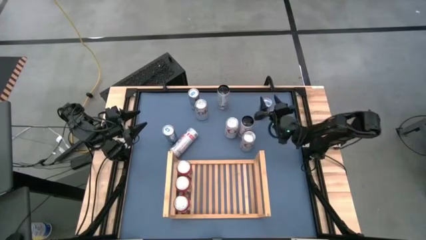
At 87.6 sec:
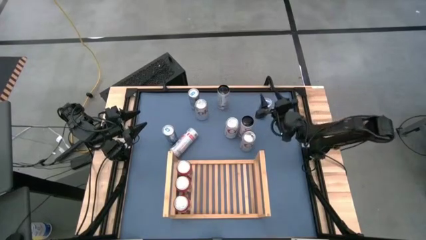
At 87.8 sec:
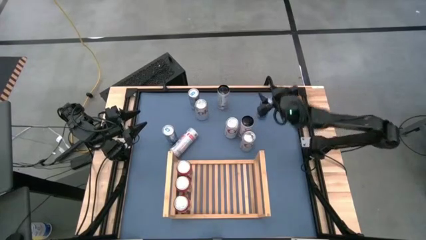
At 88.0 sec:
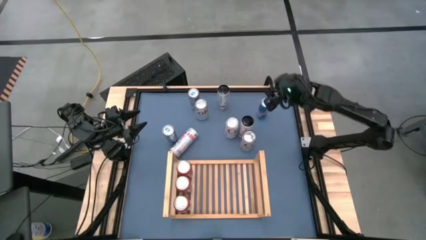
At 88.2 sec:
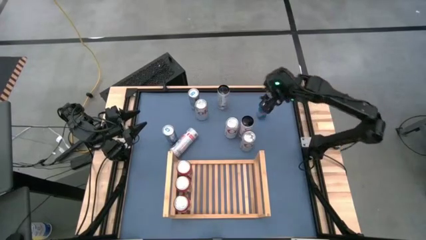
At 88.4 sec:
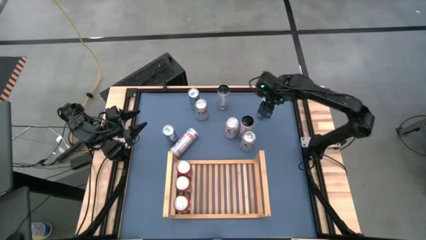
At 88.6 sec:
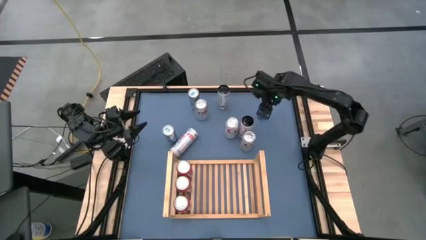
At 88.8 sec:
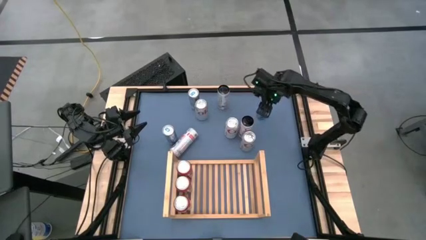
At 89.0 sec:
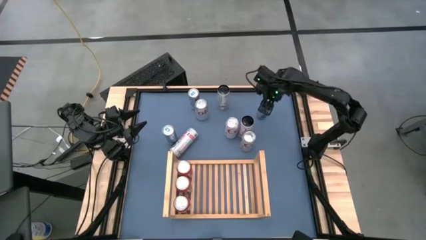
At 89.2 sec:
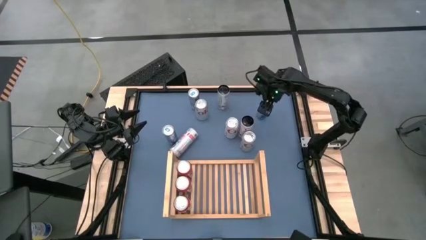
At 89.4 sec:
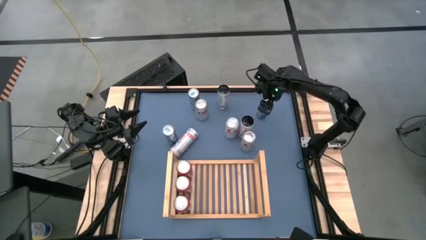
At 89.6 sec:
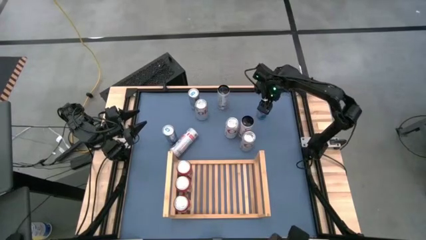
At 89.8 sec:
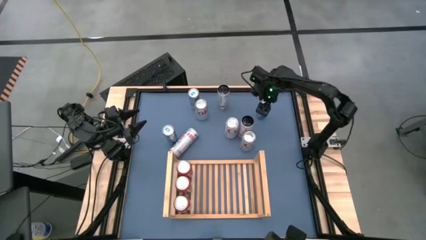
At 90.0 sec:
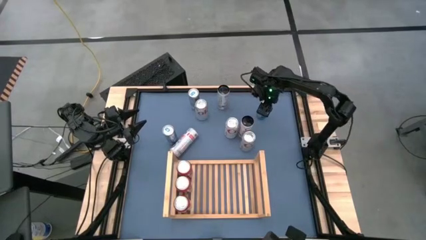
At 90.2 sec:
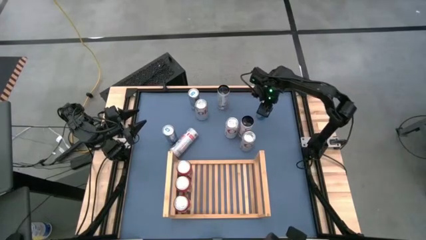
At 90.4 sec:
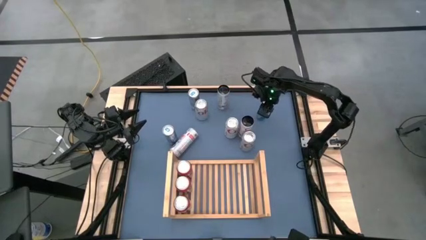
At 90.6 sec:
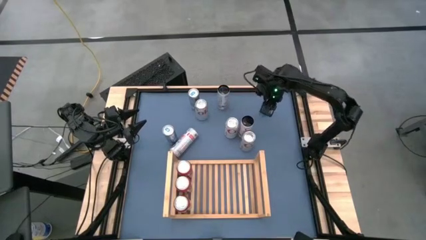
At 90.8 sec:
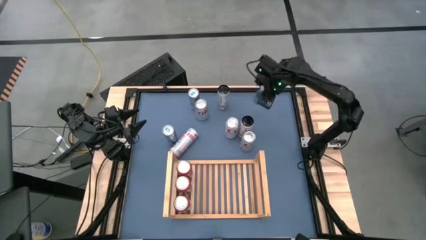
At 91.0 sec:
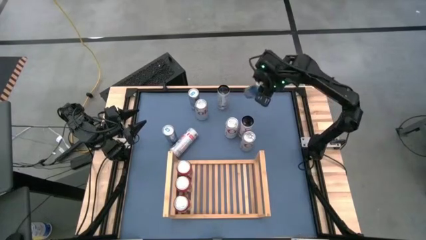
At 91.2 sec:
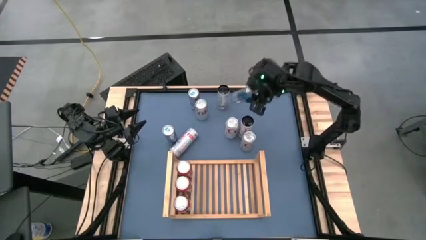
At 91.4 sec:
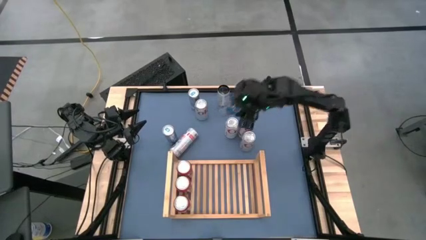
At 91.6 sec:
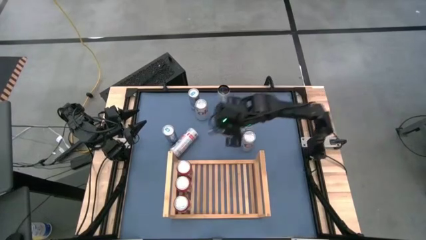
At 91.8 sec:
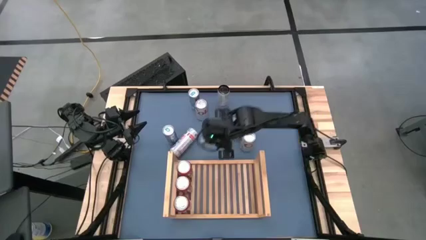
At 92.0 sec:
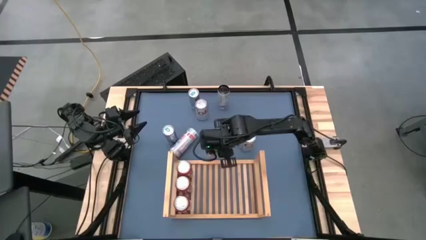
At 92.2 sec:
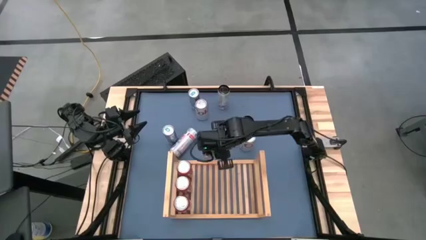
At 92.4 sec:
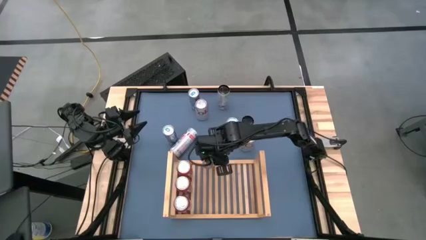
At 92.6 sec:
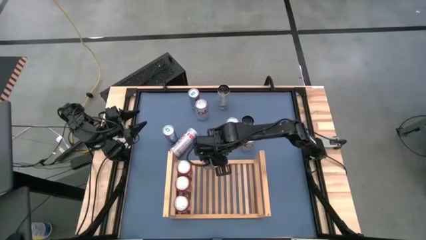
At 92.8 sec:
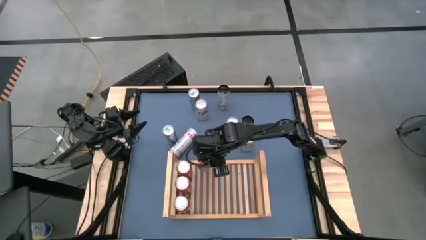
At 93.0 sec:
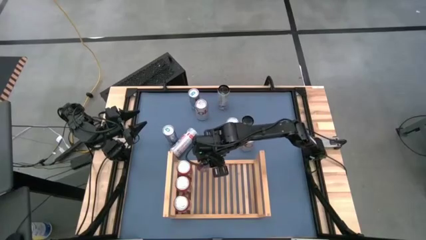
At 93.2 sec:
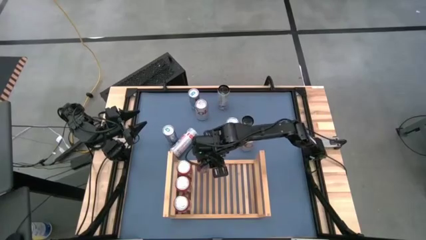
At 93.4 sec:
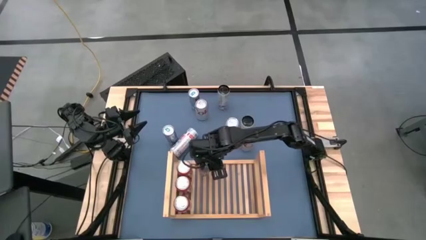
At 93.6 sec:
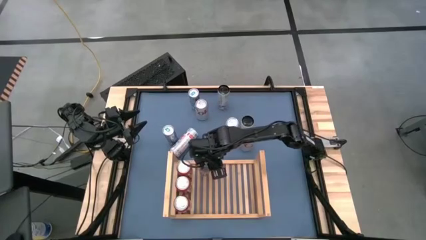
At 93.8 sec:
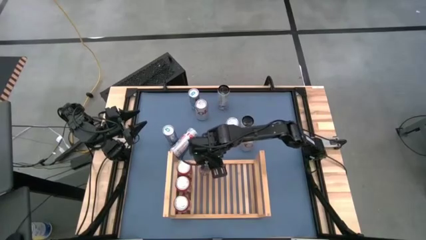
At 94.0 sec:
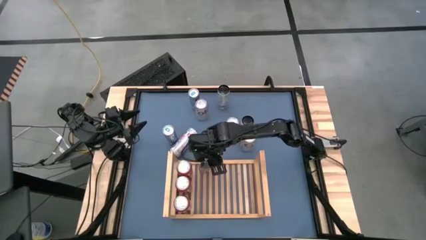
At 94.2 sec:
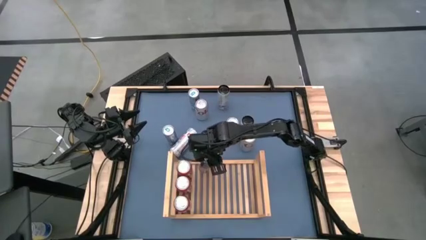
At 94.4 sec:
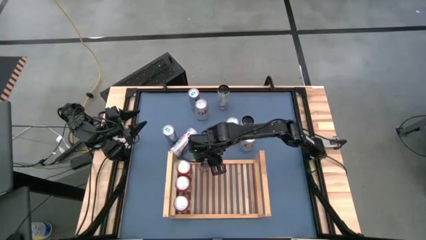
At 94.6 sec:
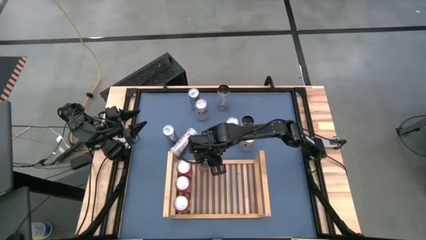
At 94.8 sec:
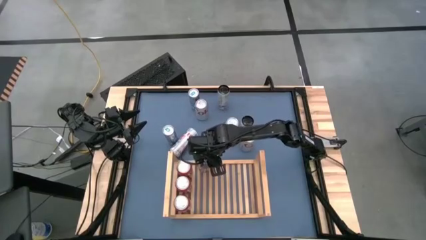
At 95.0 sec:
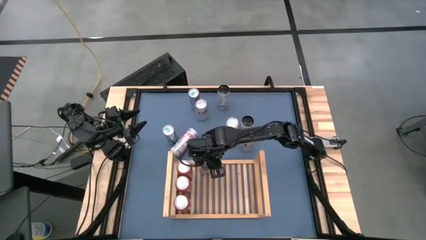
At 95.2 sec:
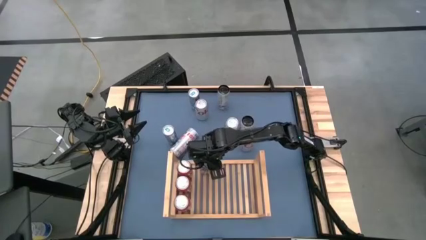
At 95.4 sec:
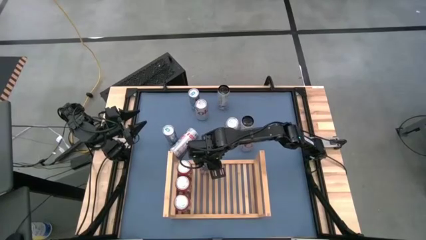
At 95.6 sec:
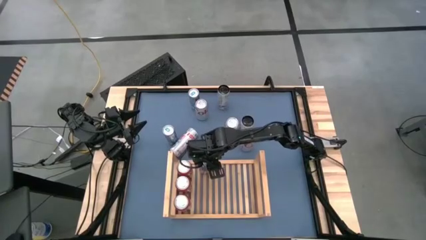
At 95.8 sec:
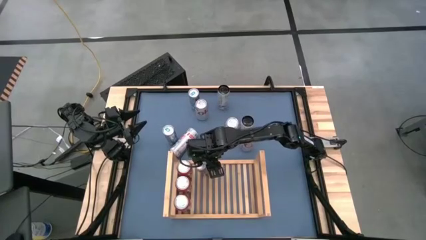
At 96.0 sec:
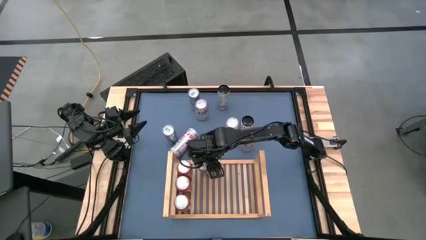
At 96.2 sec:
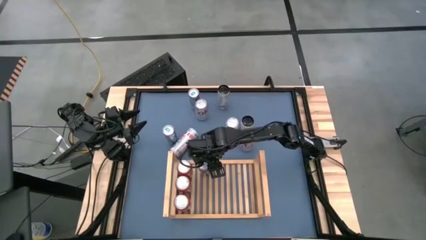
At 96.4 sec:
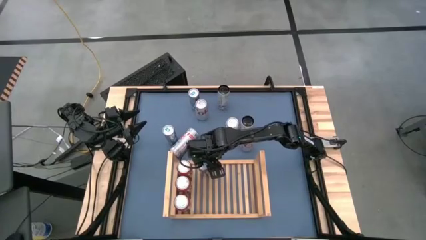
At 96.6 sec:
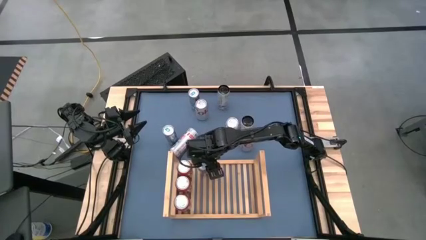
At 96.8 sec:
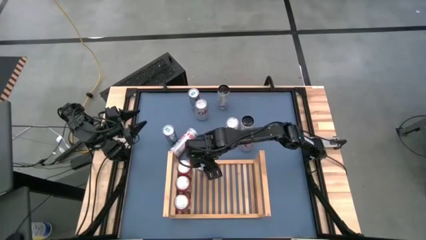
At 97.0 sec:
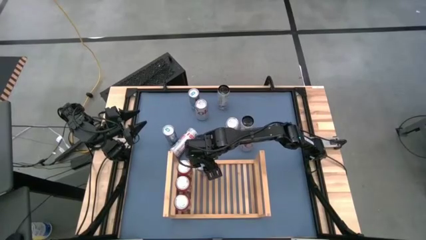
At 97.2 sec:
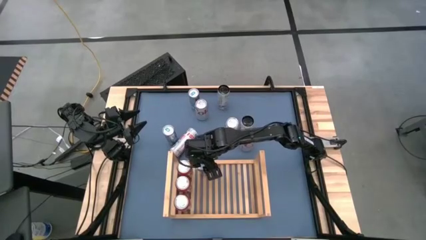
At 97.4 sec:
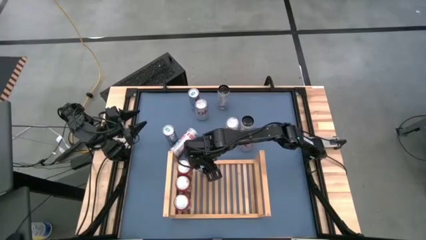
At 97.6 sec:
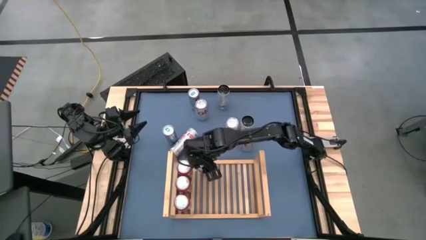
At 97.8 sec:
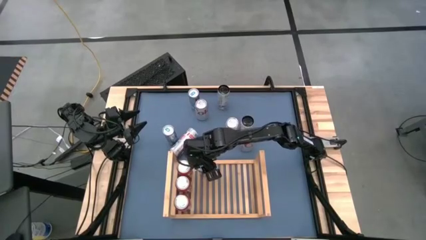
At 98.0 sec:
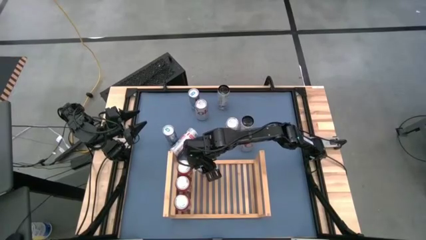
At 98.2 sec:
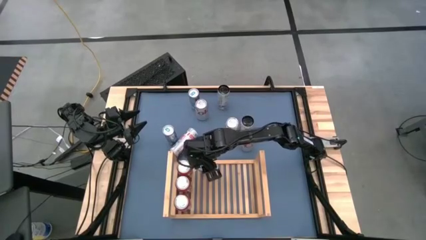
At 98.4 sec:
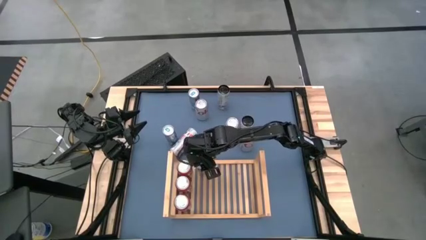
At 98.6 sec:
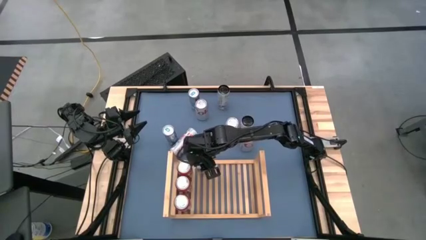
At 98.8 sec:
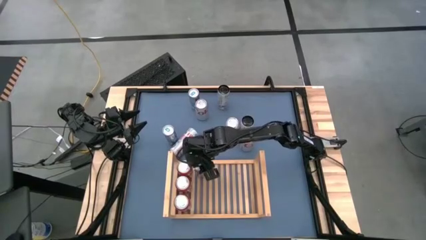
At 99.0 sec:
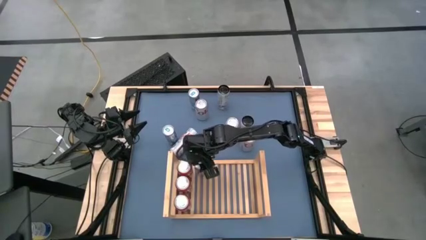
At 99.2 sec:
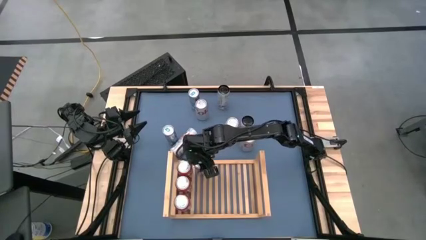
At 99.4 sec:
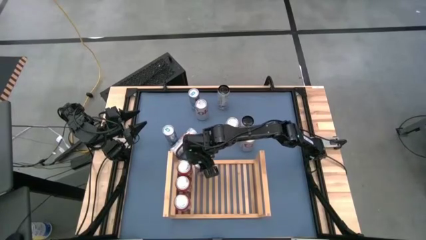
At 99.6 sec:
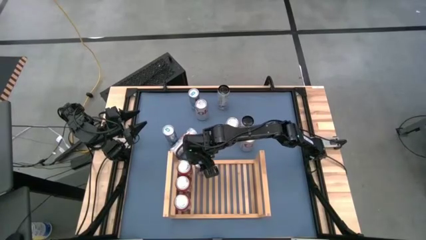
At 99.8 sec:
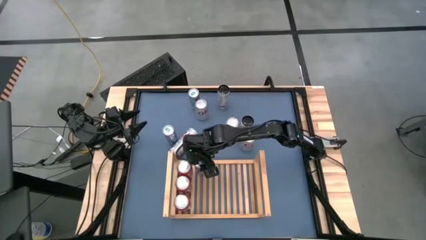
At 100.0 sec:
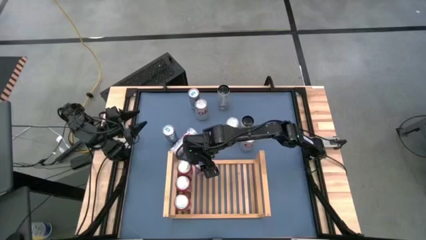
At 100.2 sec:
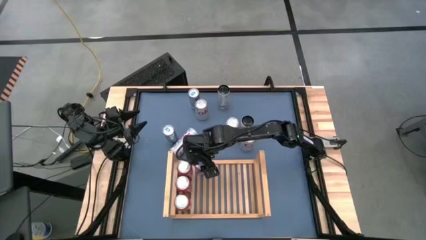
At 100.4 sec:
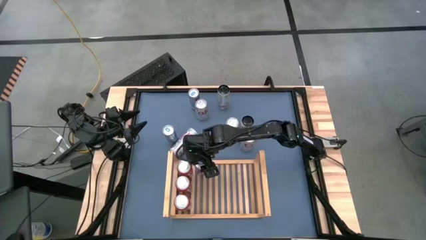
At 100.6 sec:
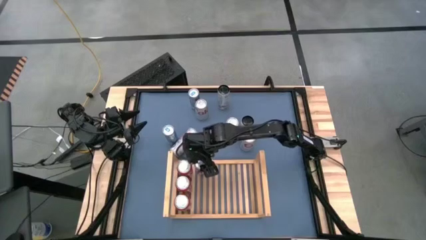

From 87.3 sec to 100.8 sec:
Task: Place canned beverage on shelf
Put the bottom blue soda can on the shelf
